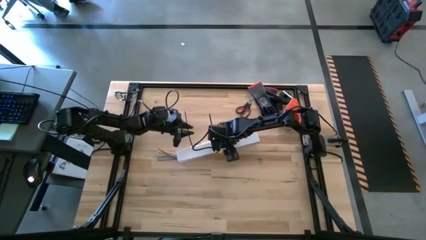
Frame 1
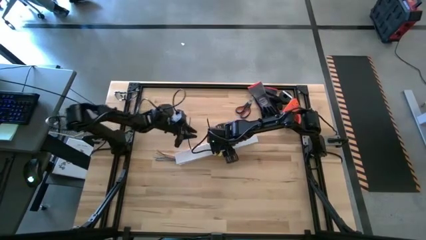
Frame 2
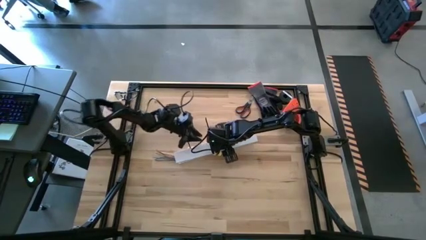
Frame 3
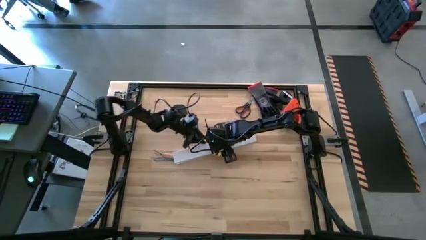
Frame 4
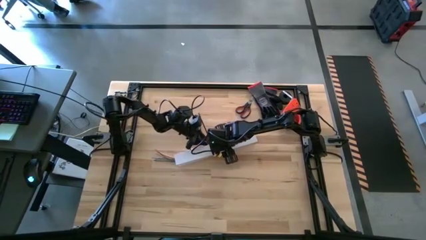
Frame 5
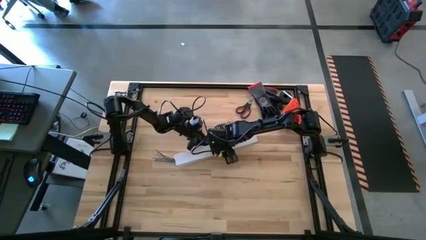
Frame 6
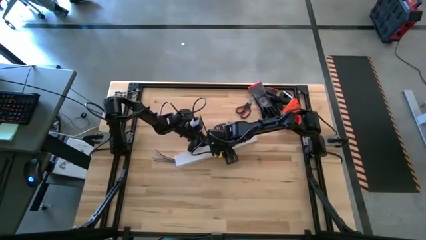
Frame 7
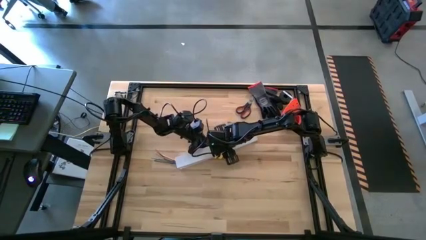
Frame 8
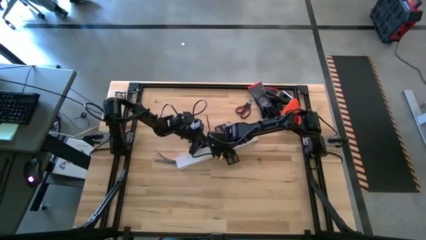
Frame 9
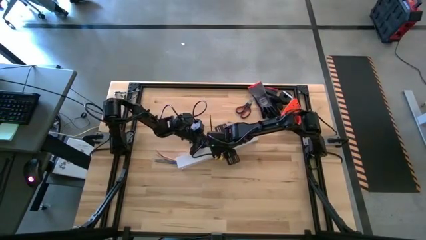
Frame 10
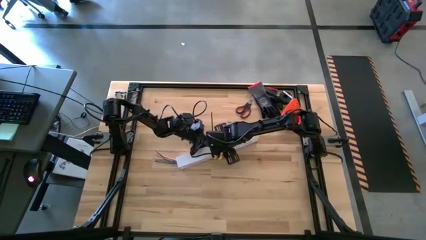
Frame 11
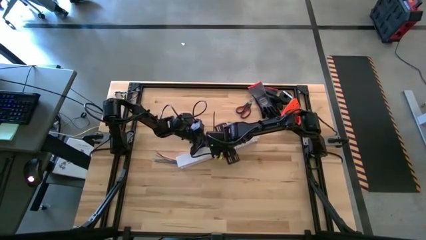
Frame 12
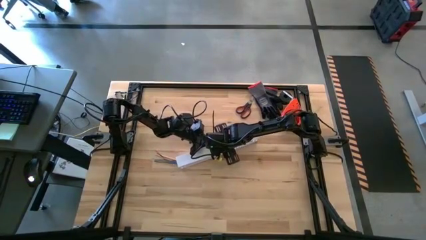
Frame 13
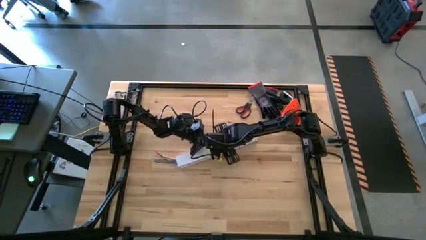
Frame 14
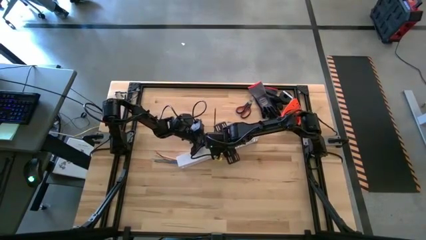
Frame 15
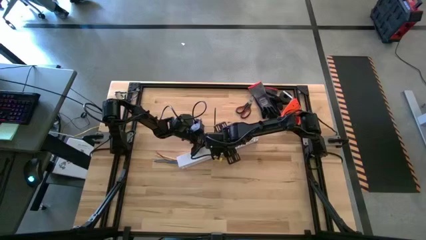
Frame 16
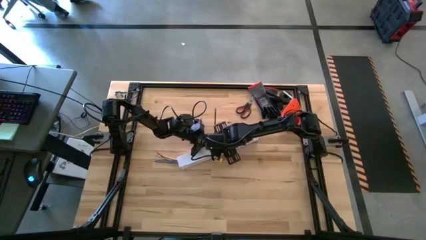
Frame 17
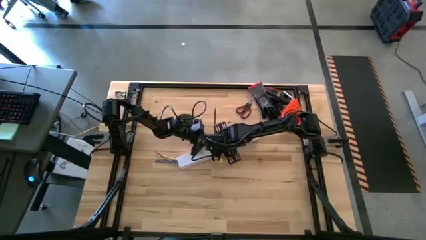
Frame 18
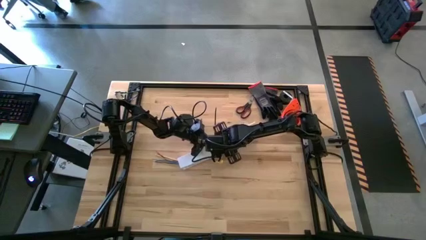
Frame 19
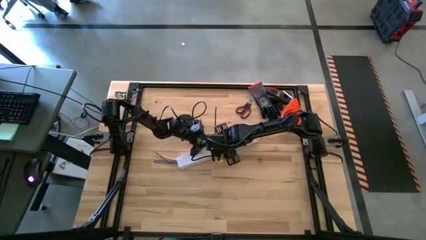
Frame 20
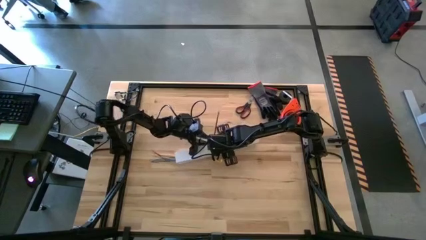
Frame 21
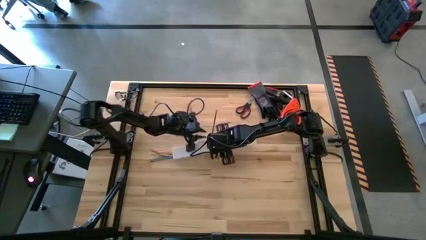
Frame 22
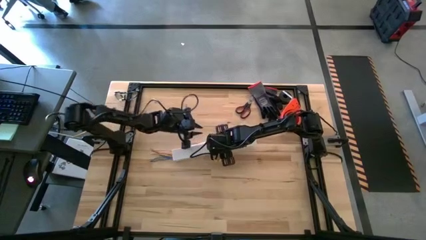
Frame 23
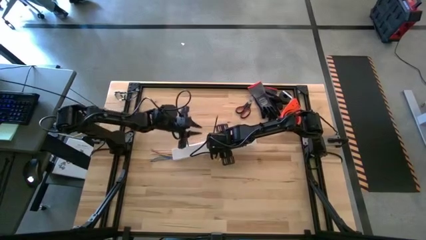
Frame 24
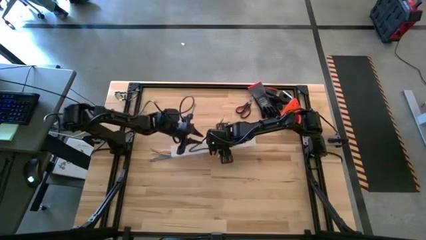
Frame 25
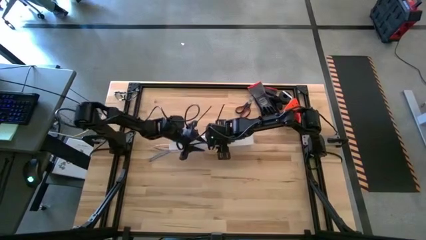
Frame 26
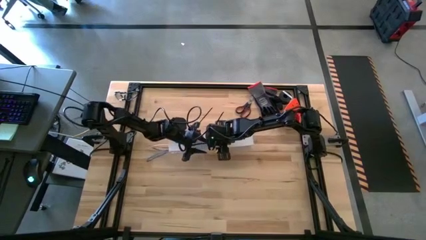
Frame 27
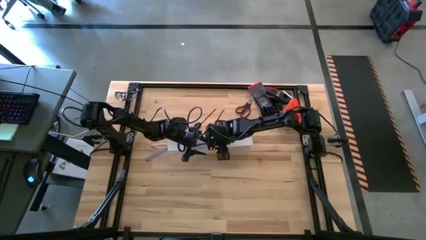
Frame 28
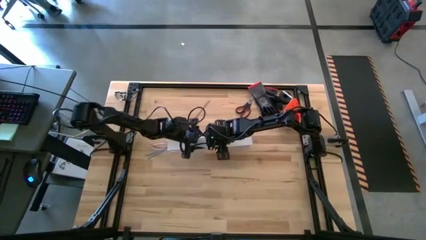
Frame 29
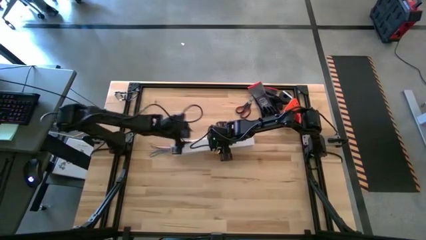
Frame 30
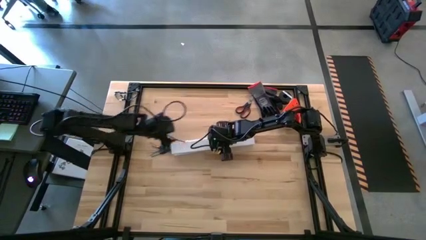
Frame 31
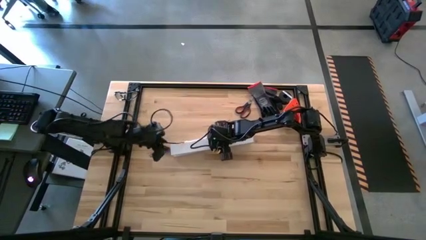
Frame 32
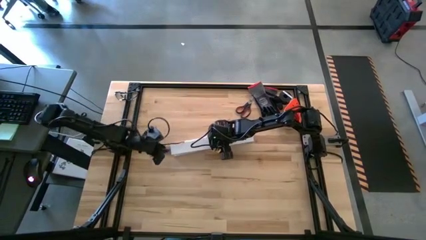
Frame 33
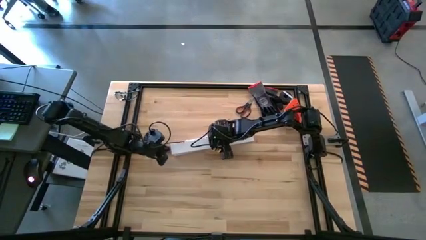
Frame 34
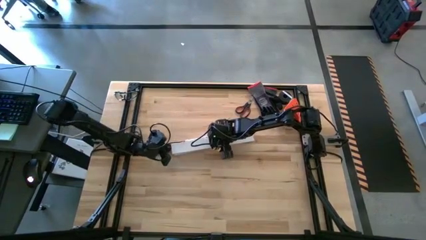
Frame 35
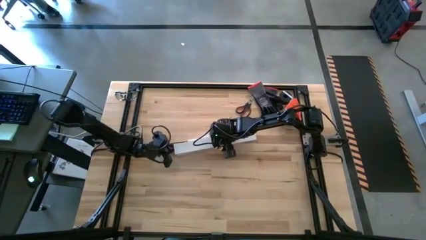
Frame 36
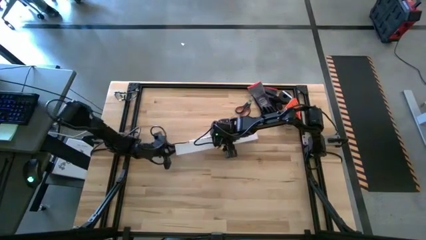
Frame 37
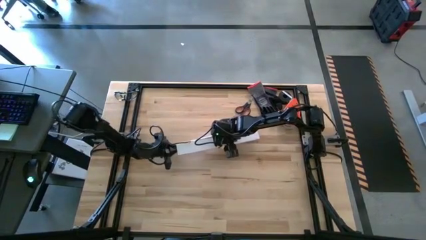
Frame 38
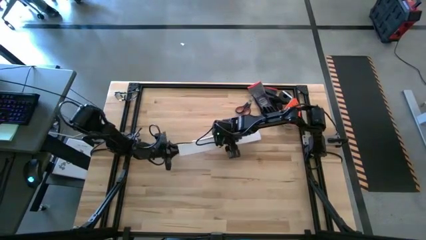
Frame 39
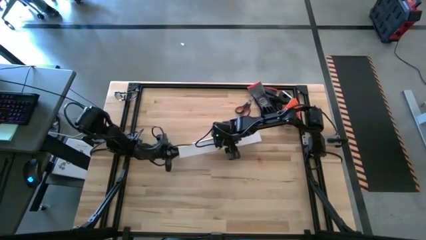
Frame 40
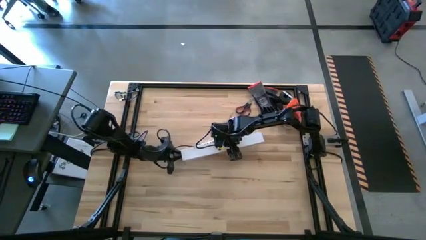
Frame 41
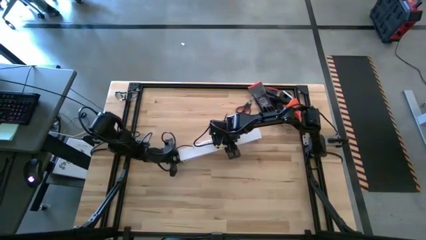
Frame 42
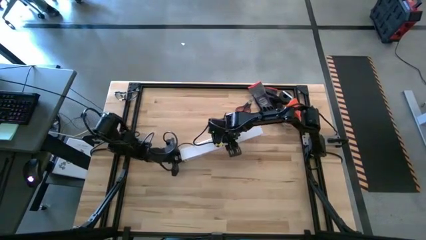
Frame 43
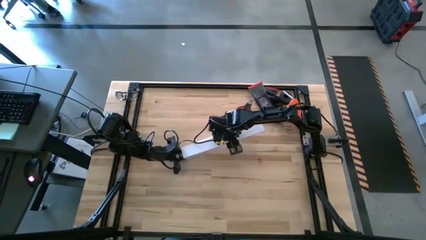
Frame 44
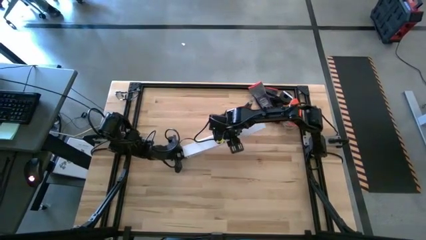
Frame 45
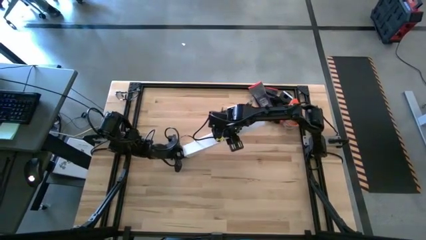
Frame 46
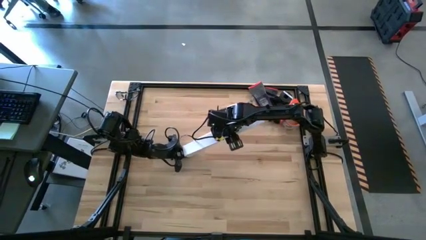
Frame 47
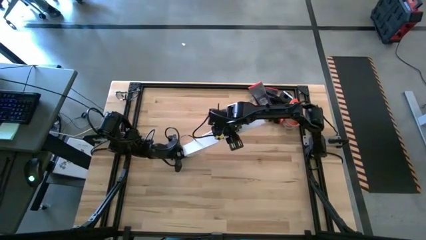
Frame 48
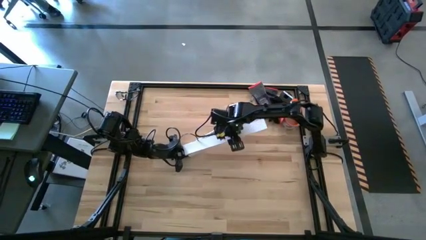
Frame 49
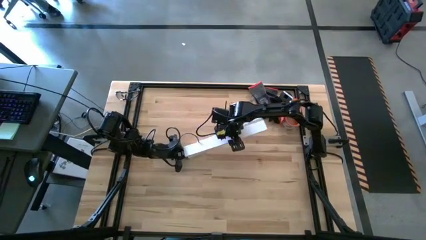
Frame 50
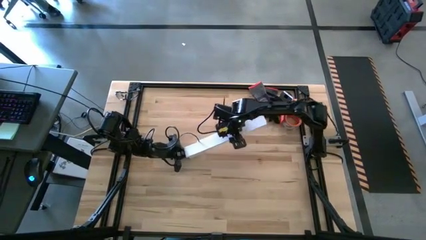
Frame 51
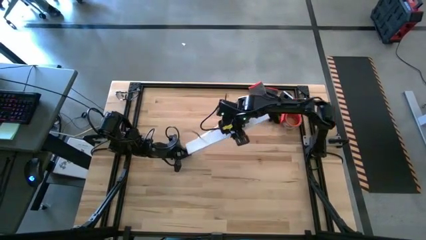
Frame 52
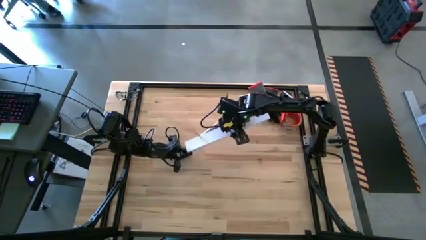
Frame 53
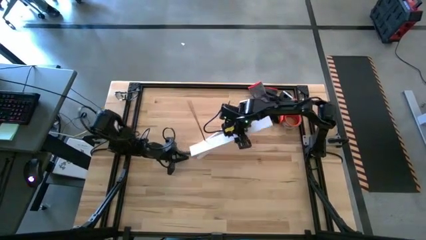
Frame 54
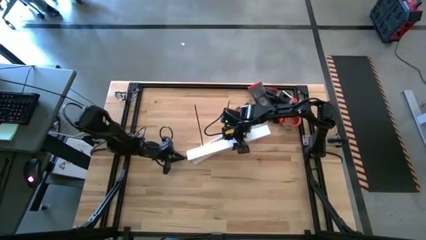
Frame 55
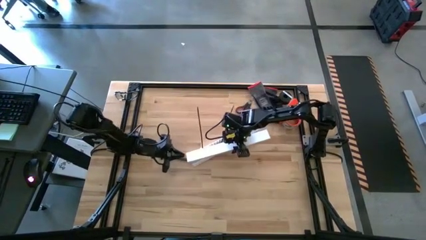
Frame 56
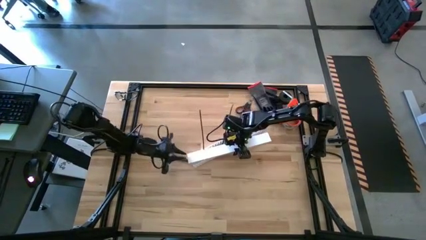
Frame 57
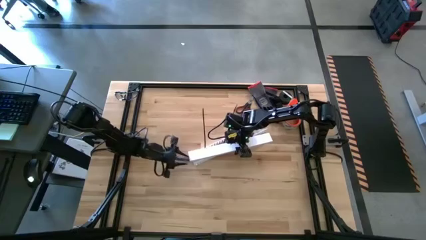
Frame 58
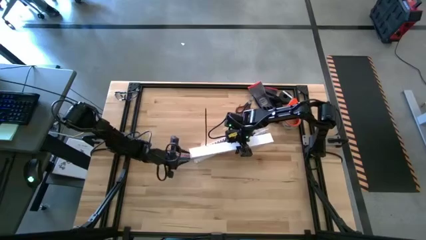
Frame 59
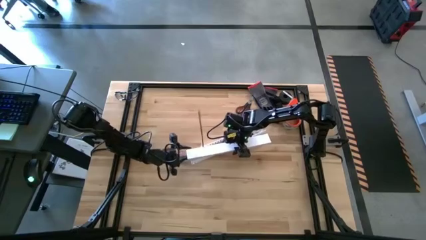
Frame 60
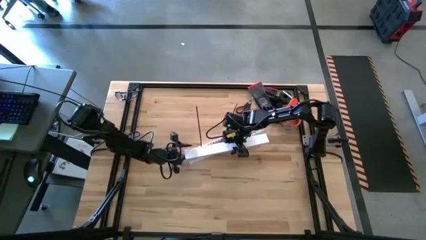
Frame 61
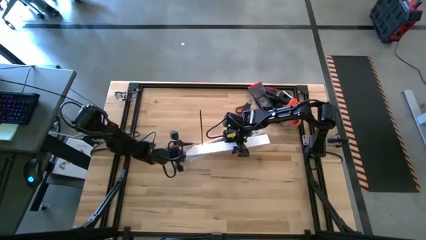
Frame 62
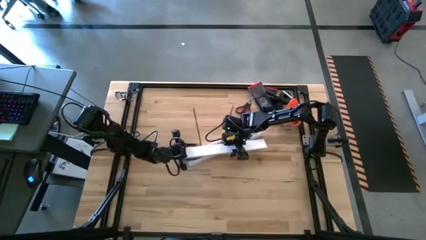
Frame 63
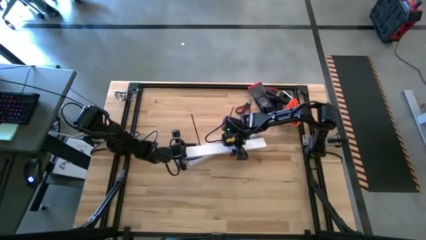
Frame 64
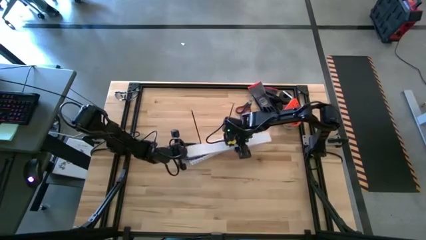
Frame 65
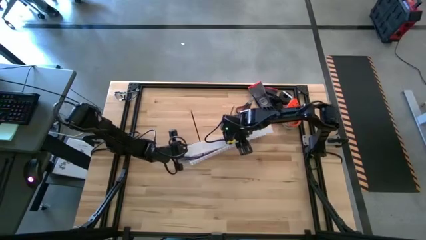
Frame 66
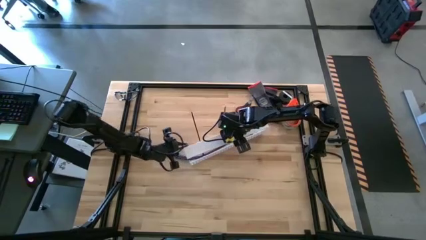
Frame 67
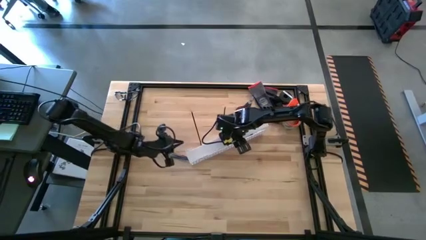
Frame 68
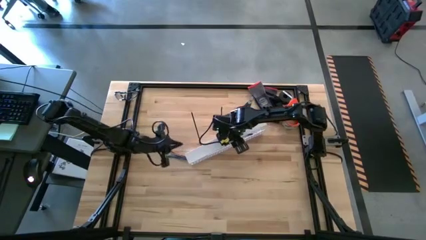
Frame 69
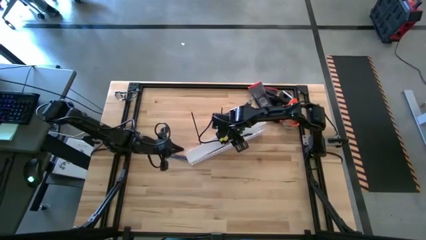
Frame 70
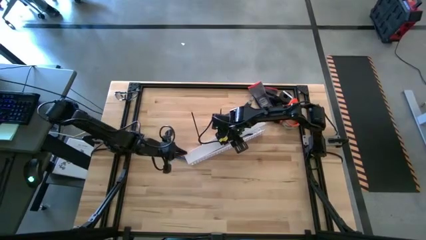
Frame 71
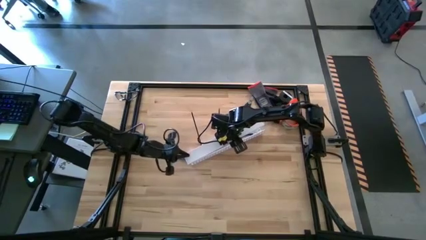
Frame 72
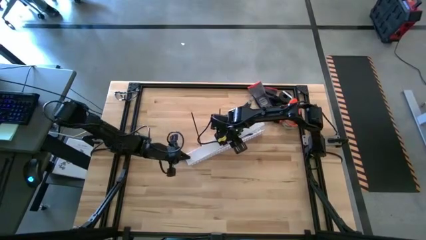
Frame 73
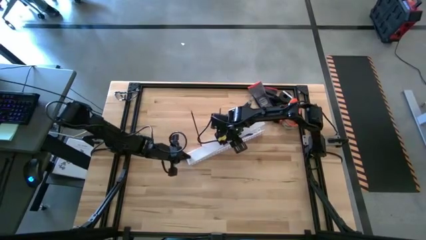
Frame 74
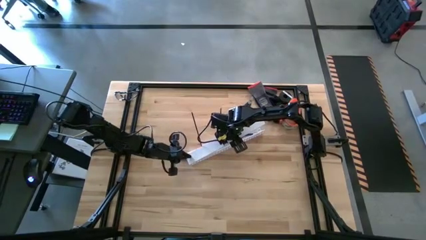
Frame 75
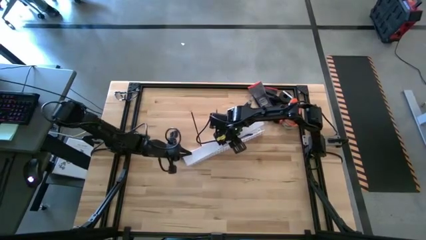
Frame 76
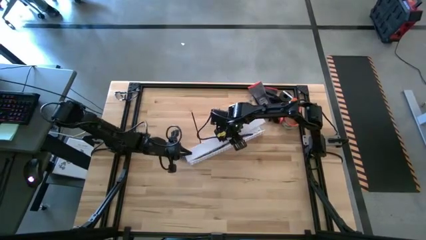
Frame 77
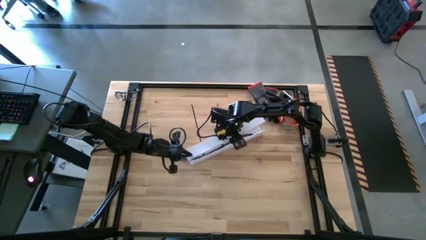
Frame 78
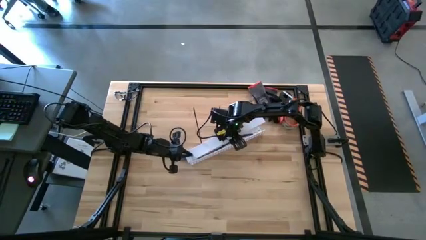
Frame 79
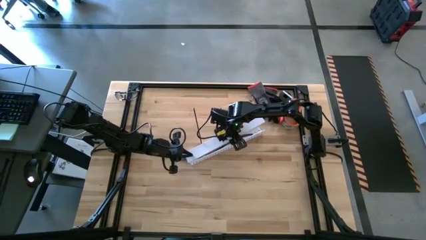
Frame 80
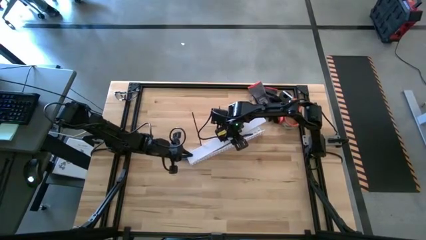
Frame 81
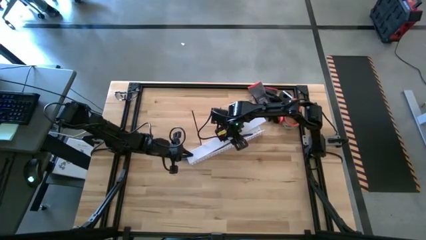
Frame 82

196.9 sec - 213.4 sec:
Task: Ziptie cables
Close the white cable duct
